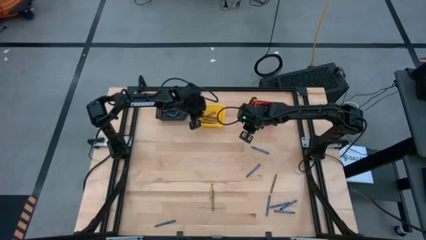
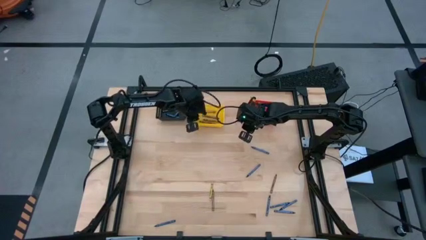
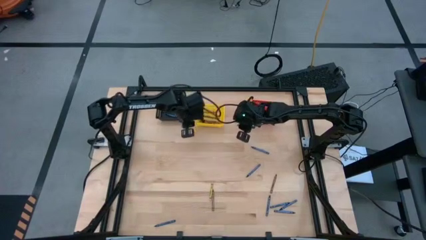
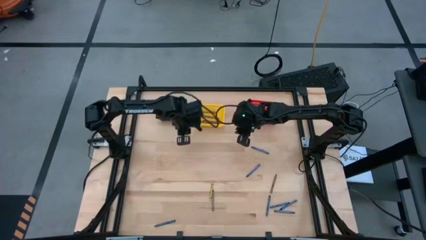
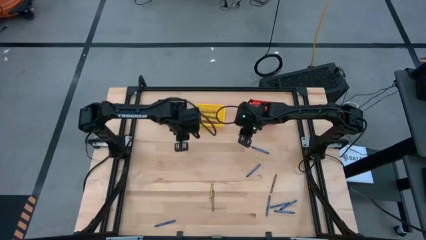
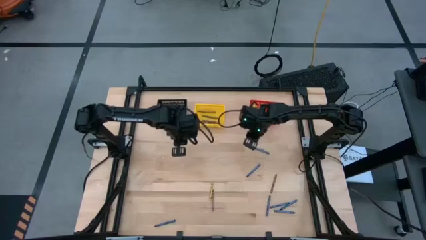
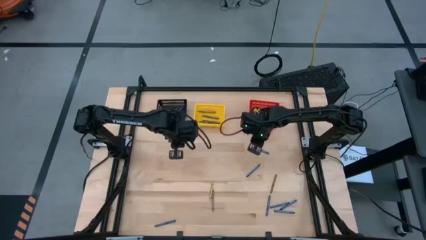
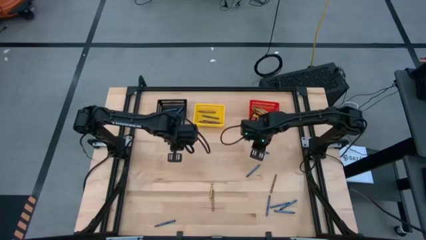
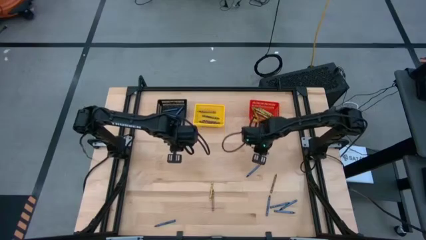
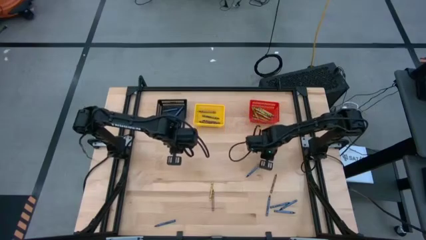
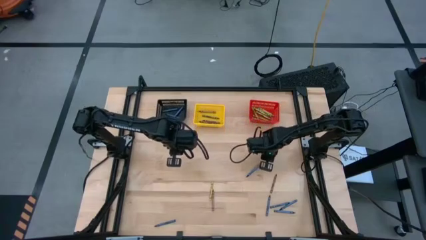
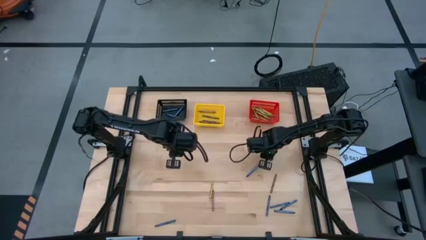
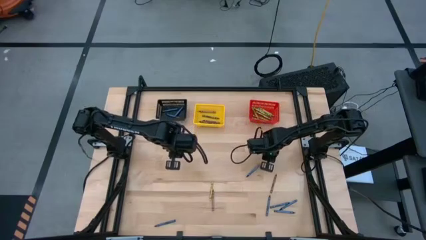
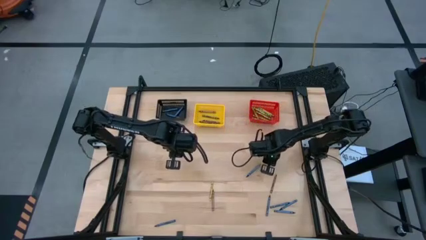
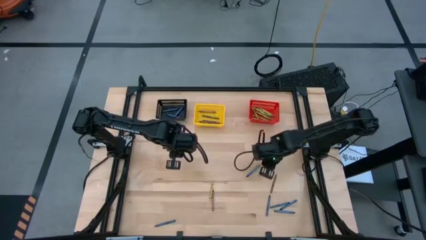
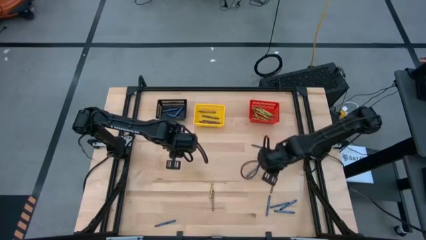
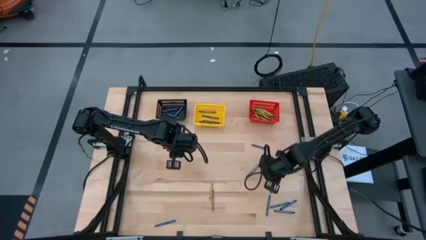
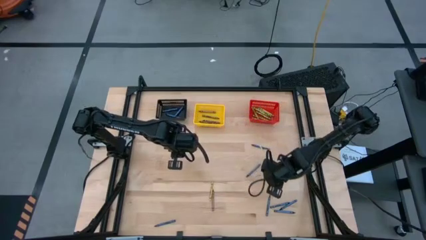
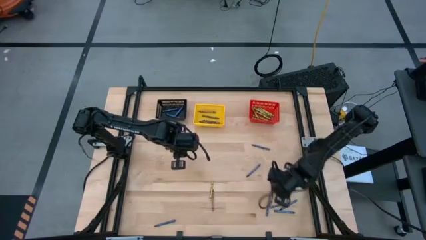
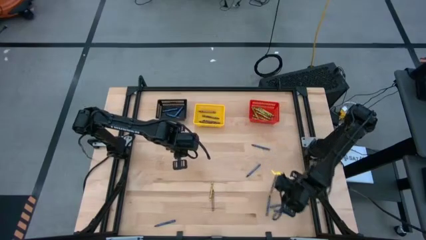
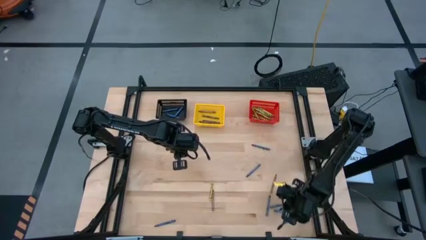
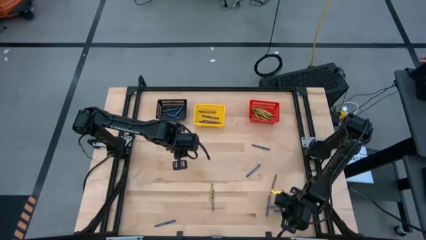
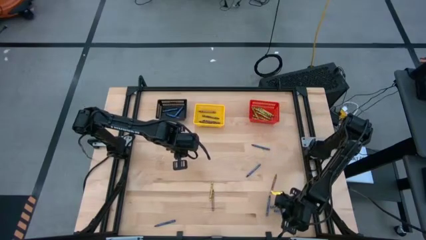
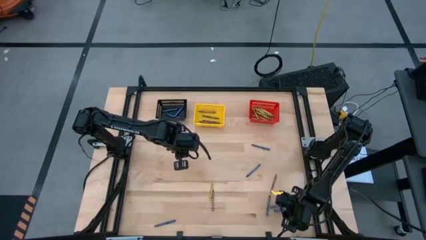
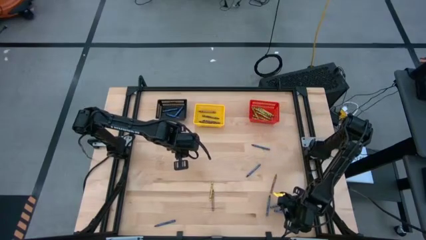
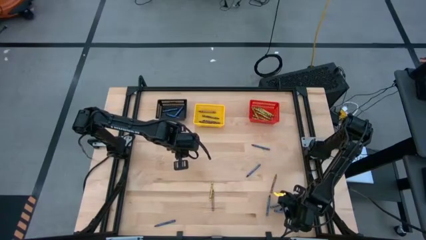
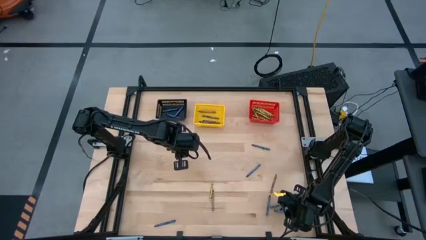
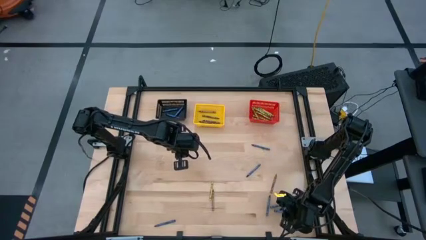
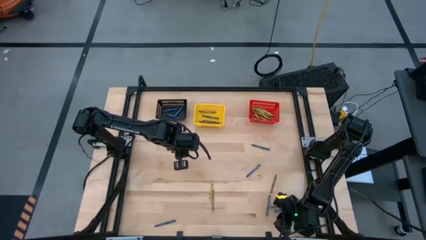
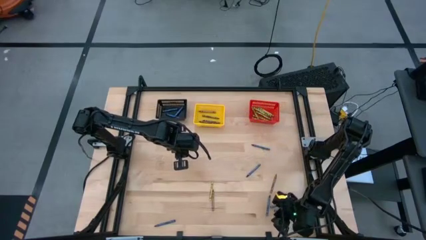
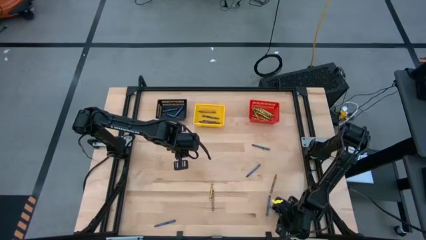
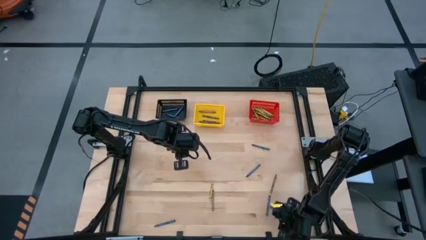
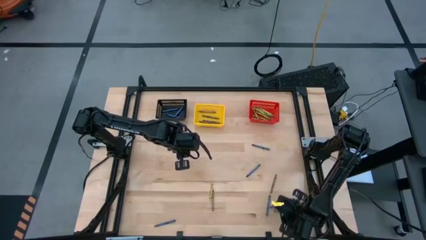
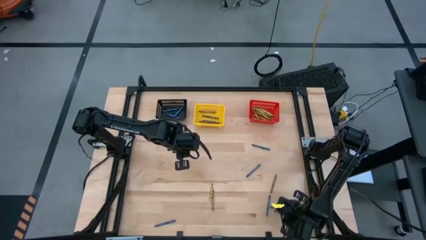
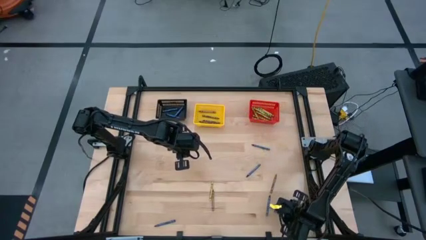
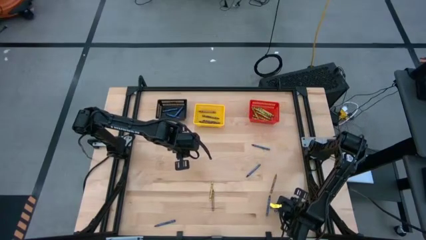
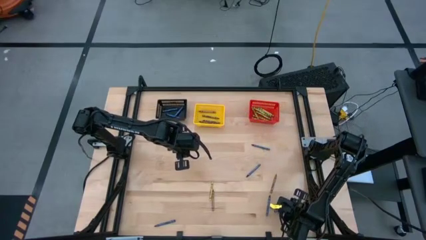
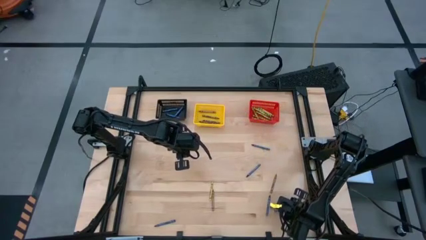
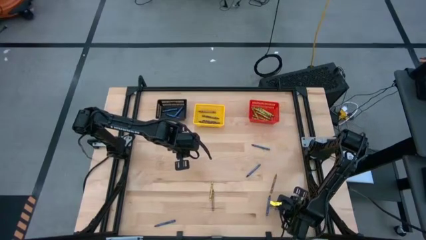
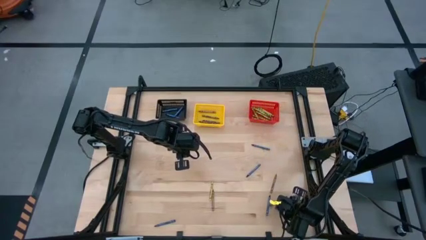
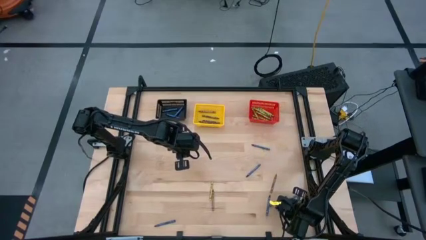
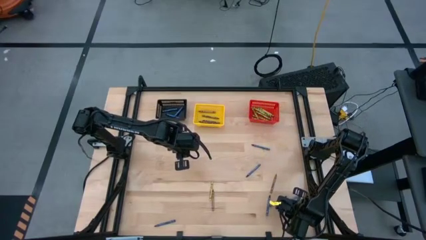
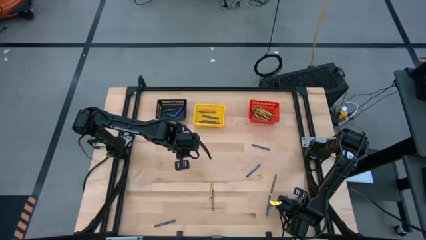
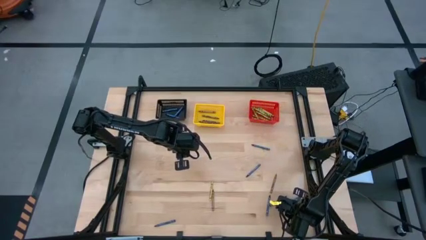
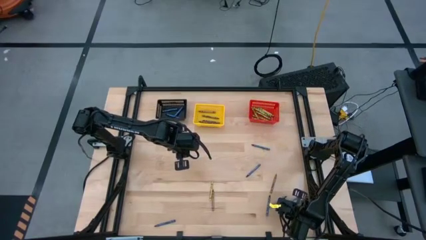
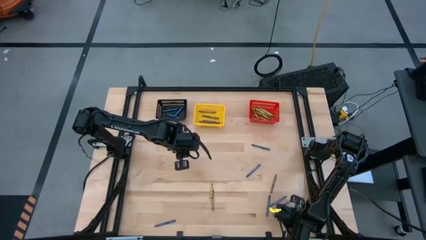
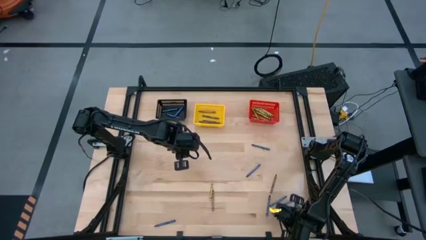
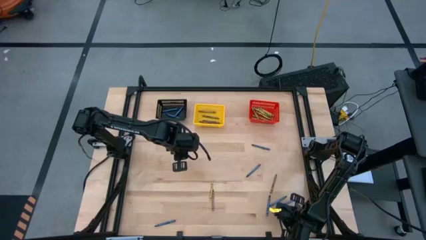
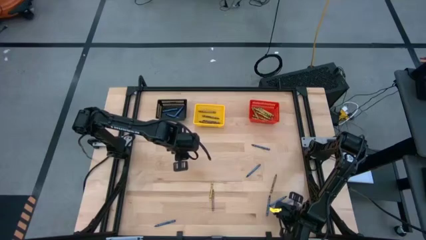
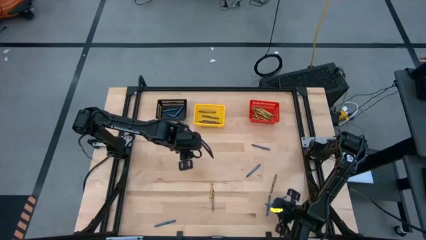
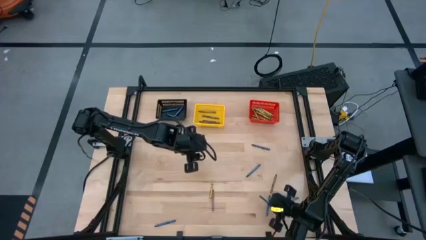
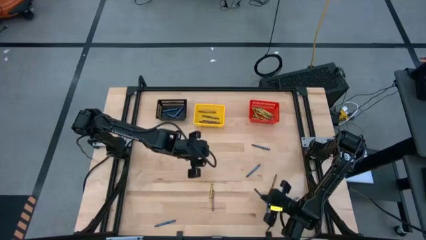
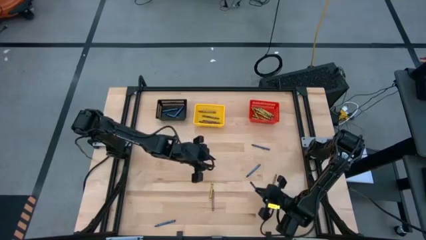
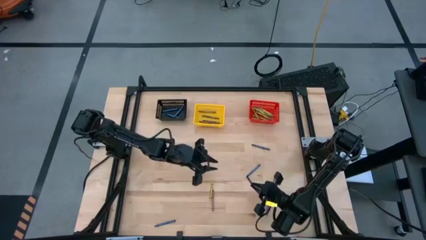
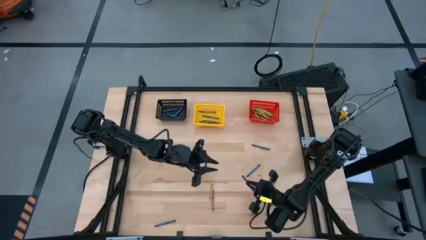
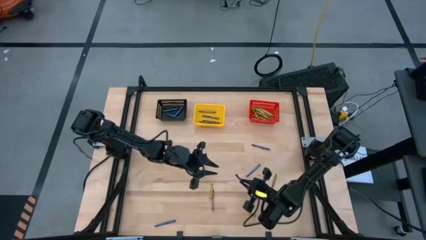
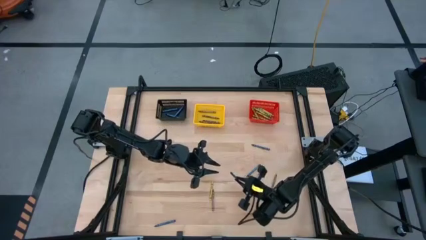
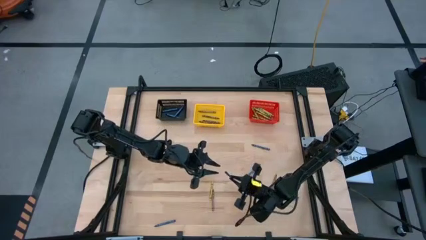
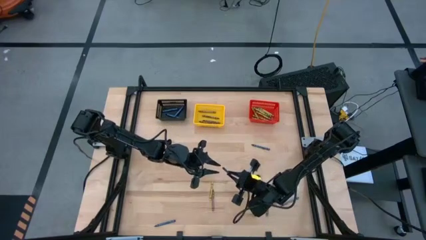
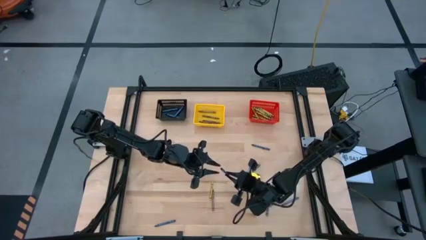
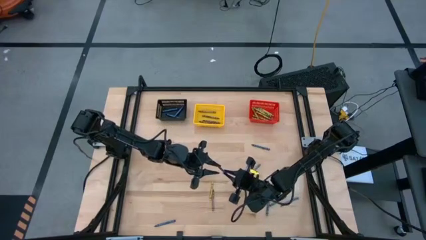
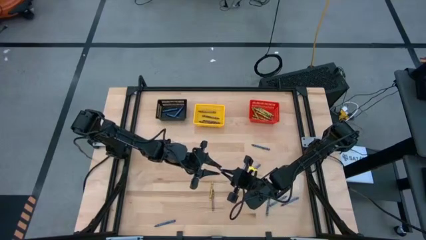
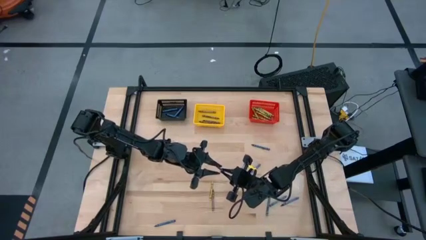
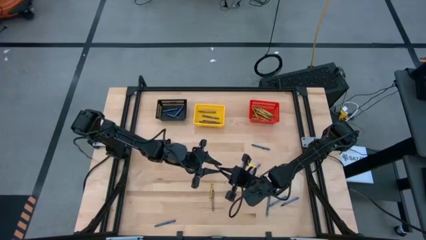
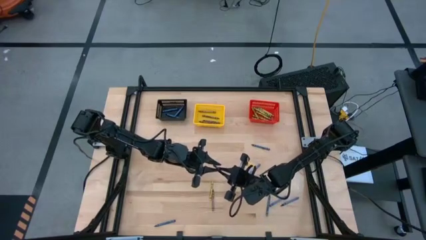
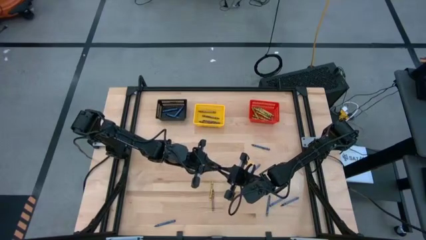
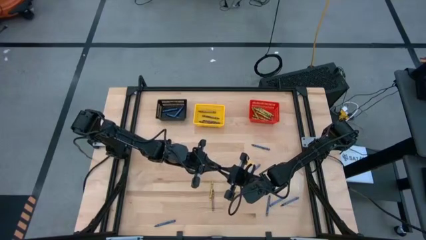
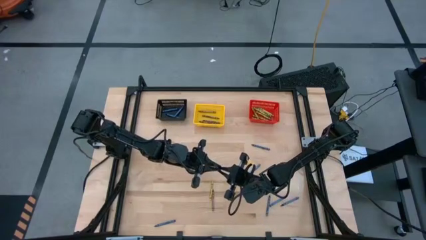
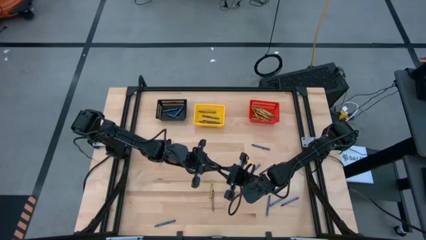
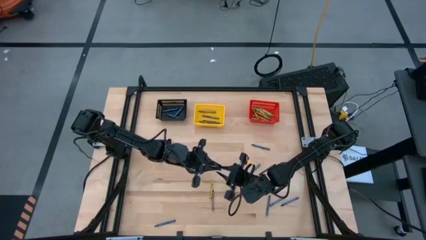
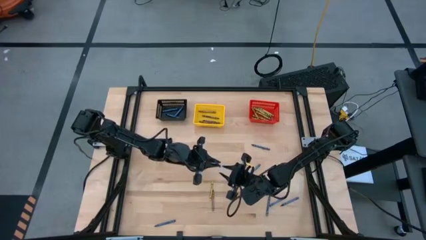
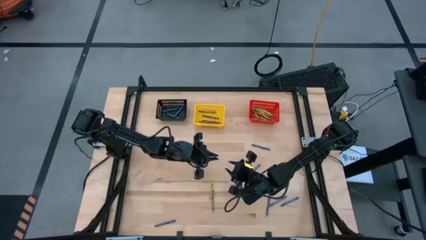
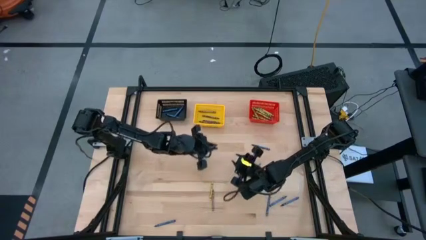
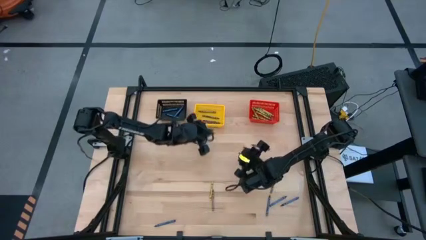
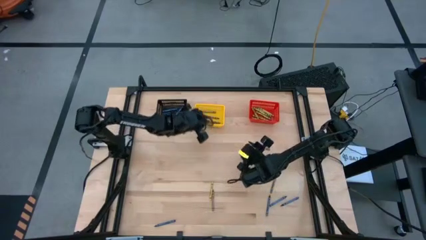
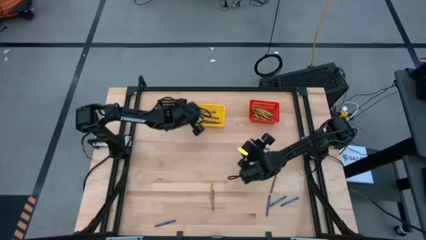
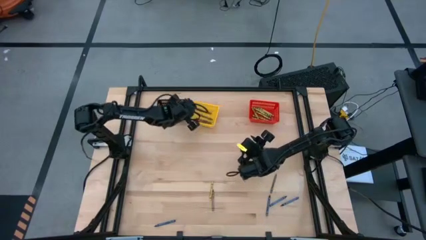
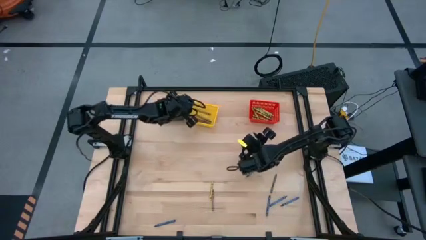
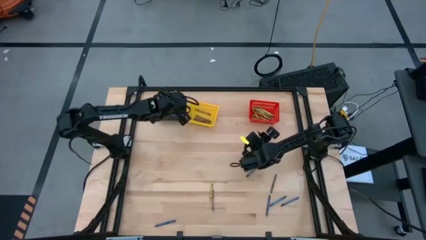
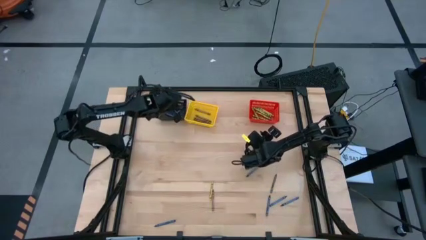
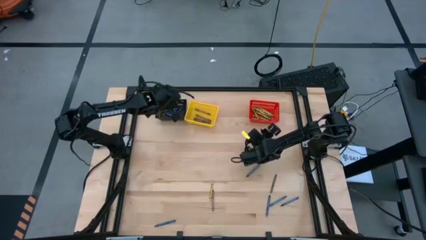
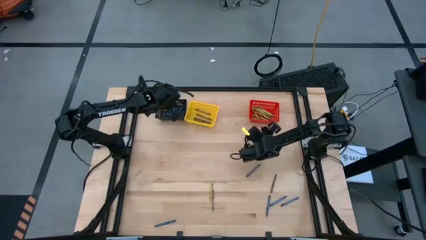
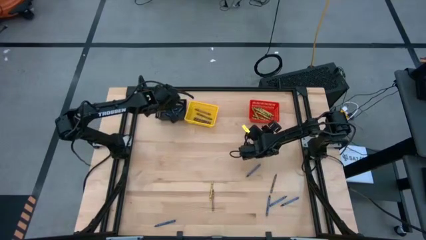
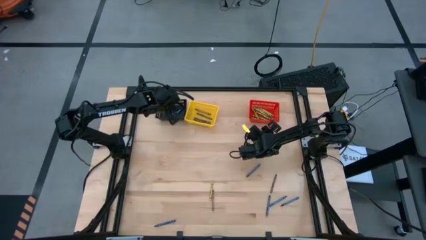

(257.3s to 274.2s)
Task: Sort crayons
Put the blue crayon into the black bin
